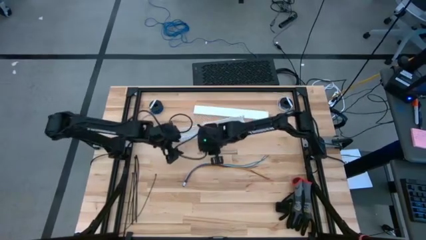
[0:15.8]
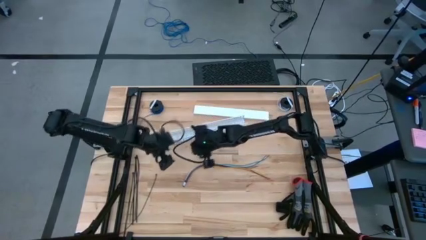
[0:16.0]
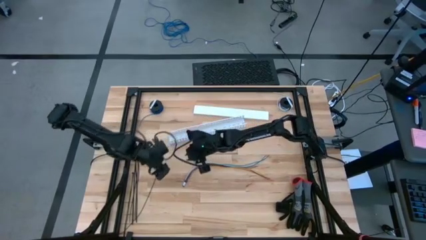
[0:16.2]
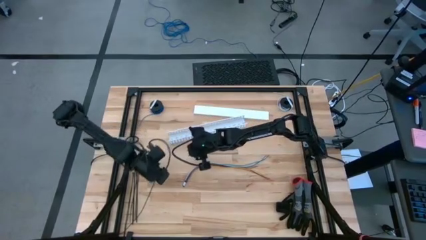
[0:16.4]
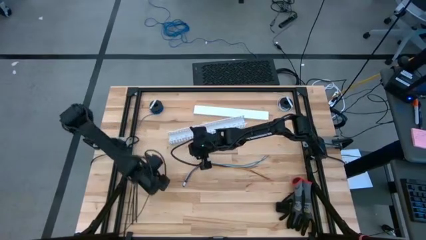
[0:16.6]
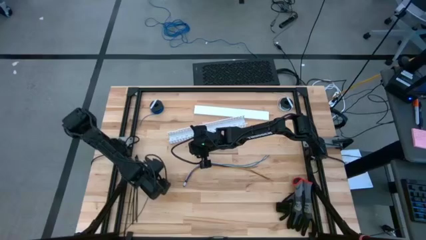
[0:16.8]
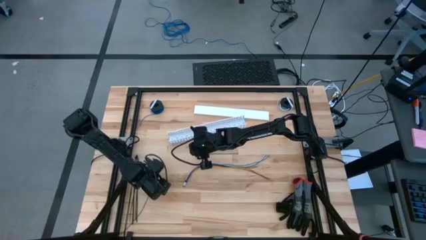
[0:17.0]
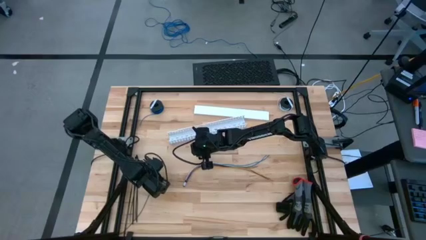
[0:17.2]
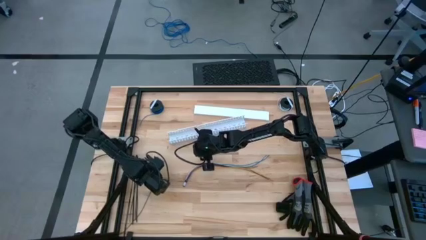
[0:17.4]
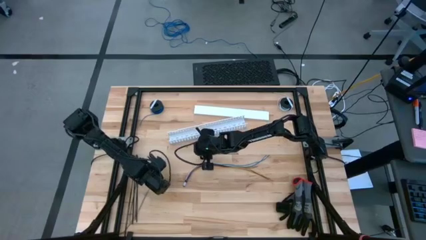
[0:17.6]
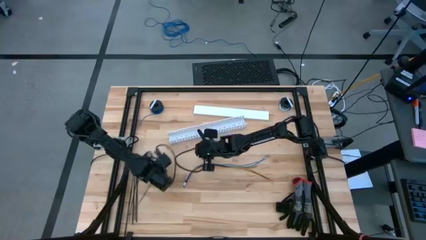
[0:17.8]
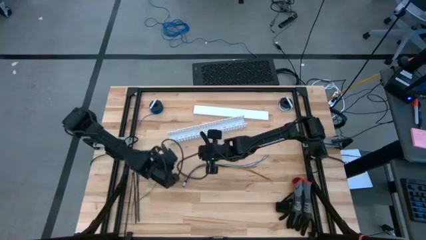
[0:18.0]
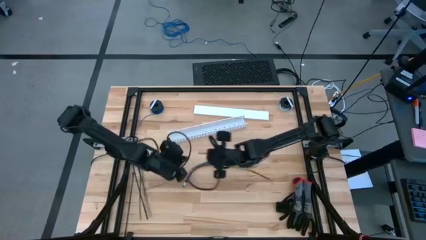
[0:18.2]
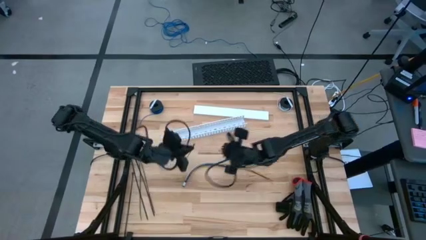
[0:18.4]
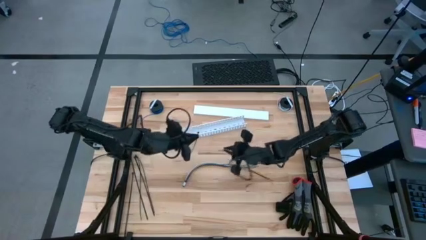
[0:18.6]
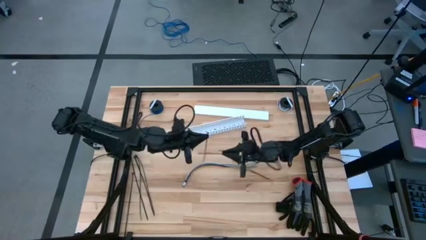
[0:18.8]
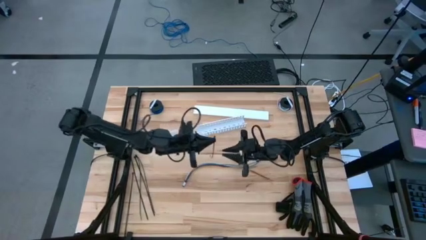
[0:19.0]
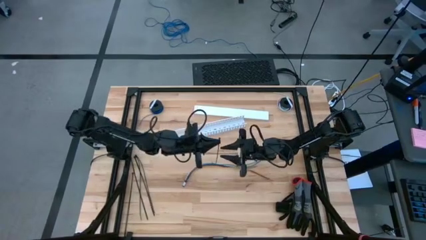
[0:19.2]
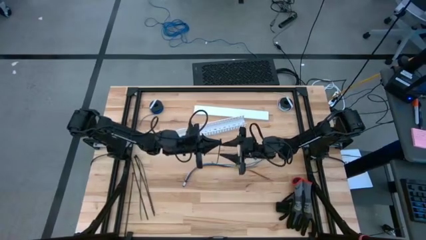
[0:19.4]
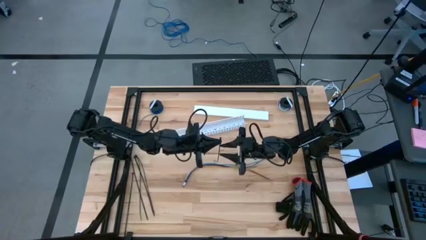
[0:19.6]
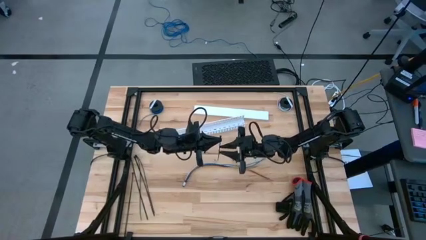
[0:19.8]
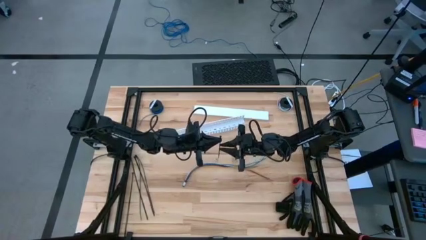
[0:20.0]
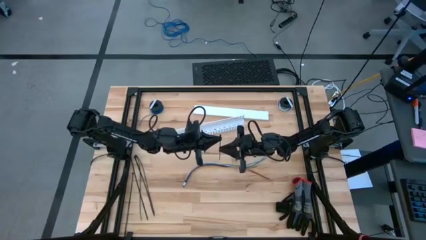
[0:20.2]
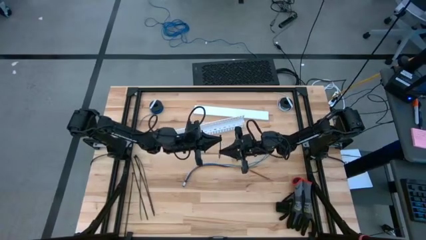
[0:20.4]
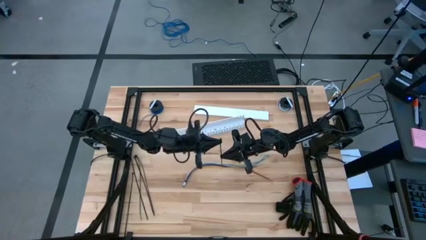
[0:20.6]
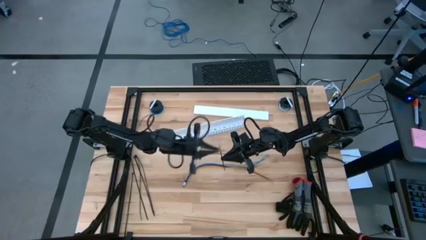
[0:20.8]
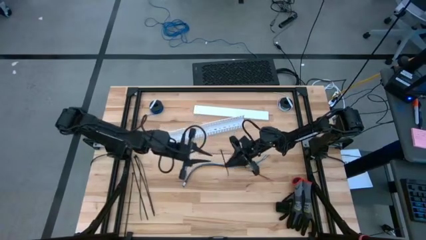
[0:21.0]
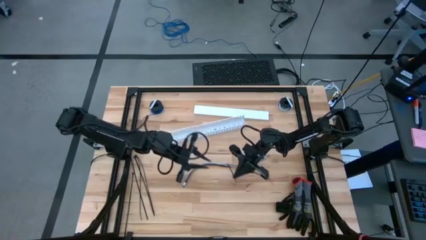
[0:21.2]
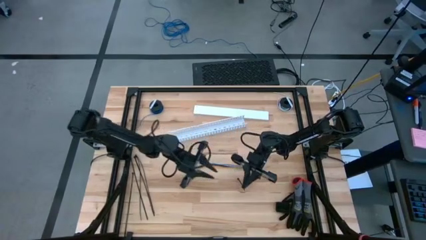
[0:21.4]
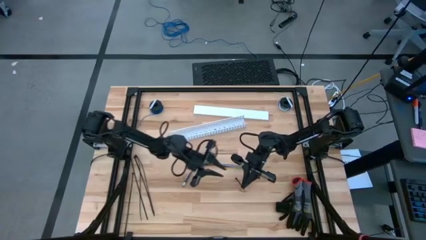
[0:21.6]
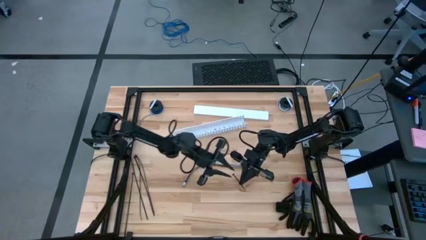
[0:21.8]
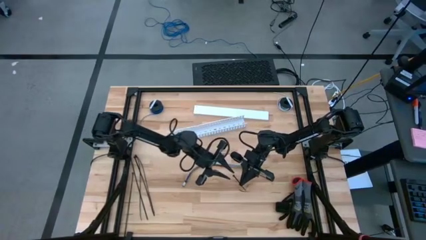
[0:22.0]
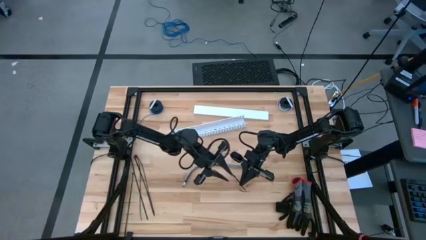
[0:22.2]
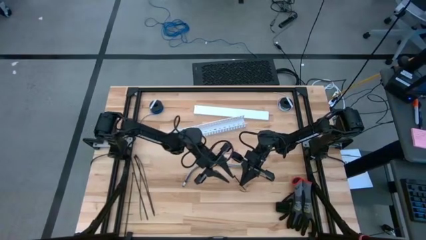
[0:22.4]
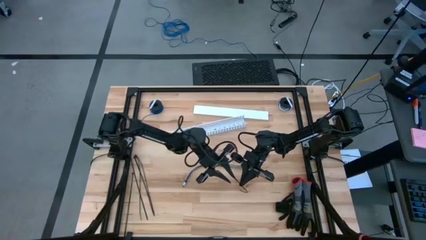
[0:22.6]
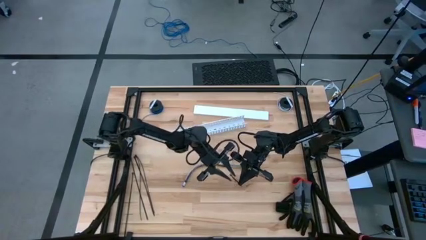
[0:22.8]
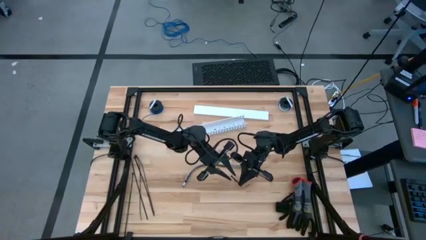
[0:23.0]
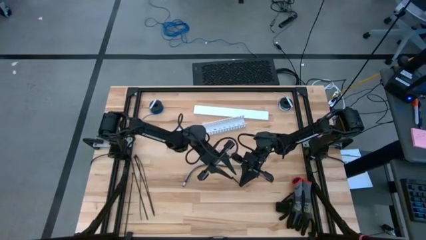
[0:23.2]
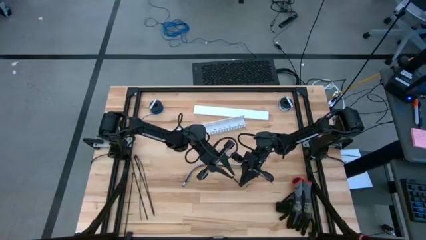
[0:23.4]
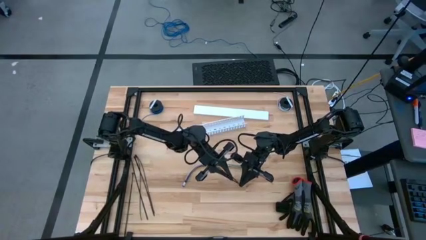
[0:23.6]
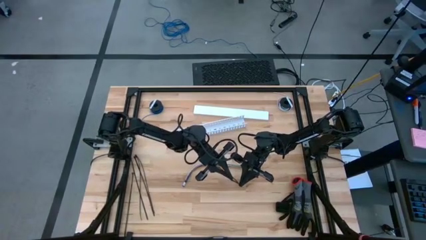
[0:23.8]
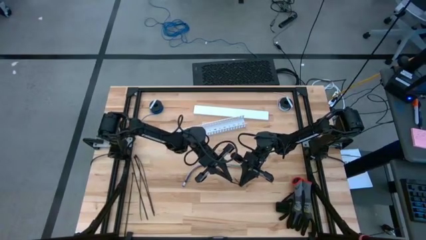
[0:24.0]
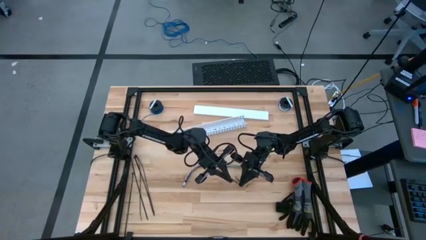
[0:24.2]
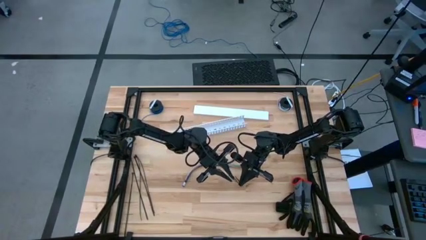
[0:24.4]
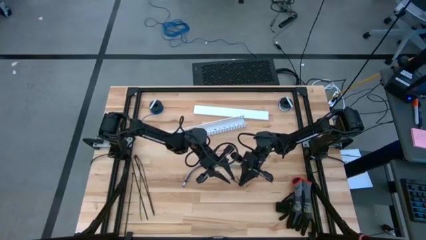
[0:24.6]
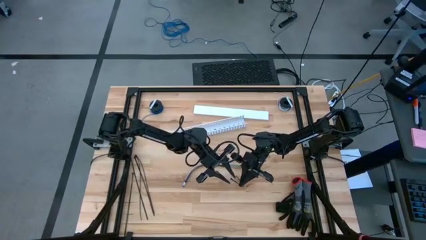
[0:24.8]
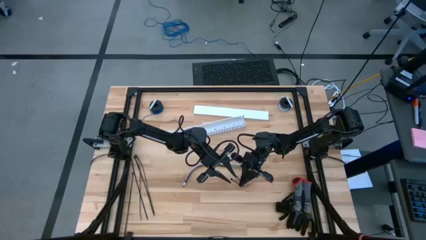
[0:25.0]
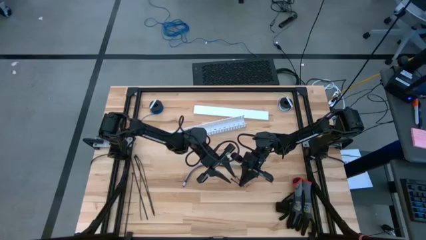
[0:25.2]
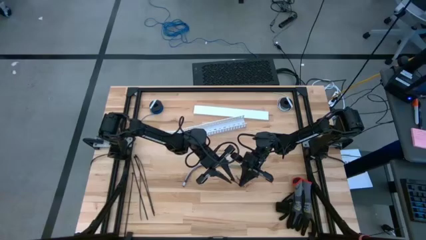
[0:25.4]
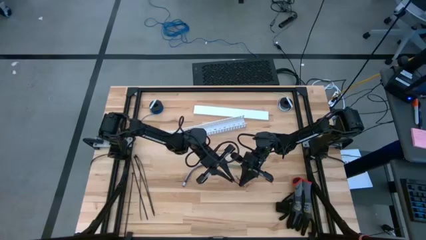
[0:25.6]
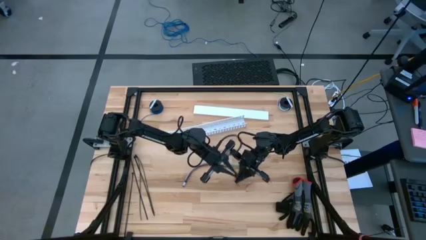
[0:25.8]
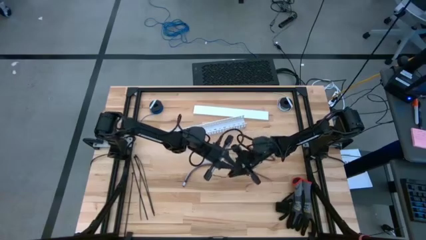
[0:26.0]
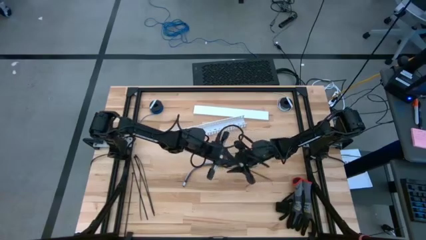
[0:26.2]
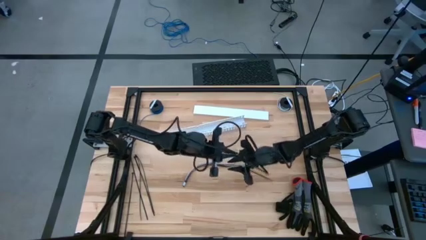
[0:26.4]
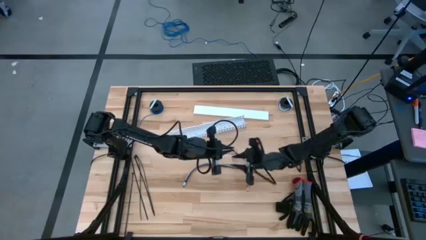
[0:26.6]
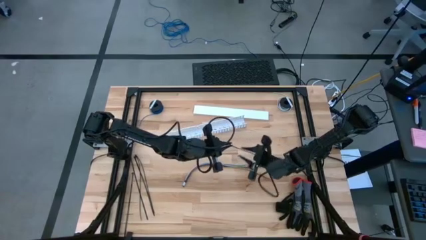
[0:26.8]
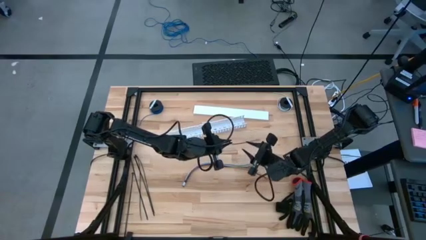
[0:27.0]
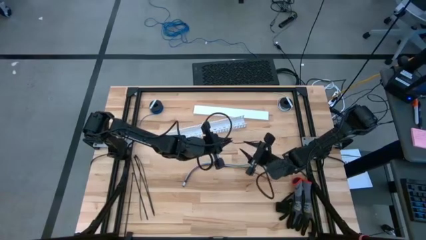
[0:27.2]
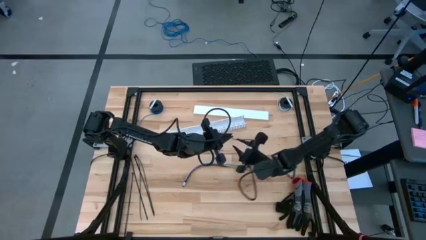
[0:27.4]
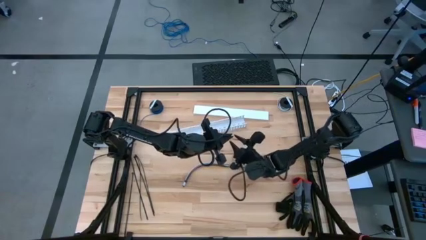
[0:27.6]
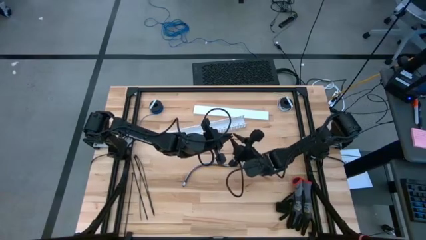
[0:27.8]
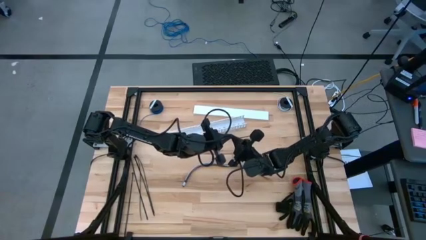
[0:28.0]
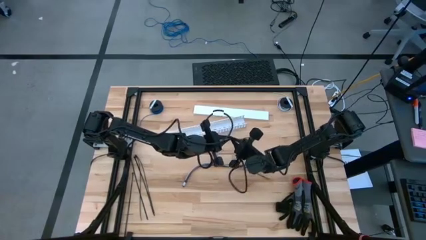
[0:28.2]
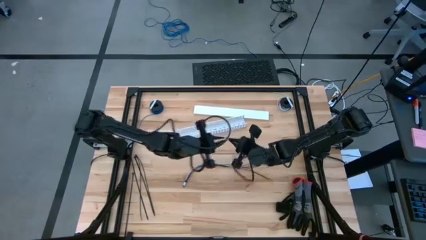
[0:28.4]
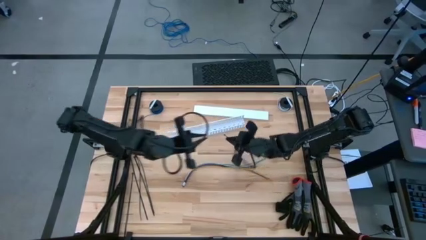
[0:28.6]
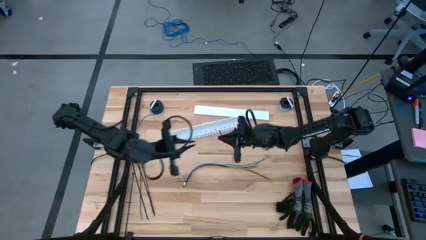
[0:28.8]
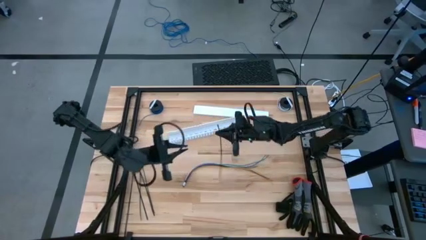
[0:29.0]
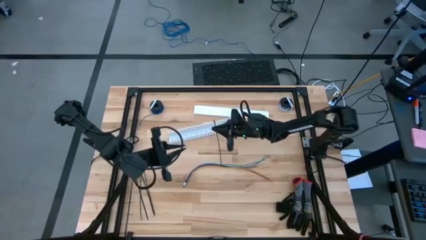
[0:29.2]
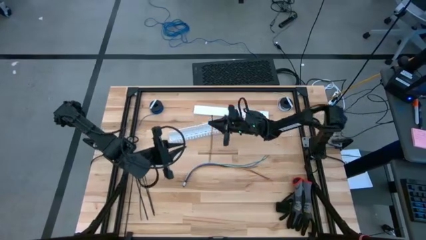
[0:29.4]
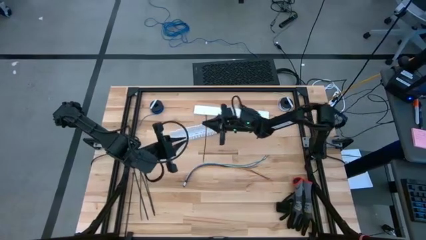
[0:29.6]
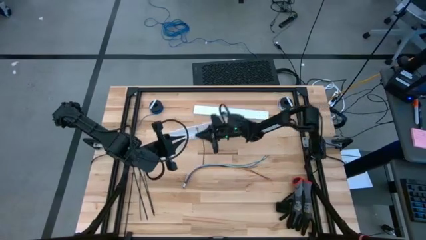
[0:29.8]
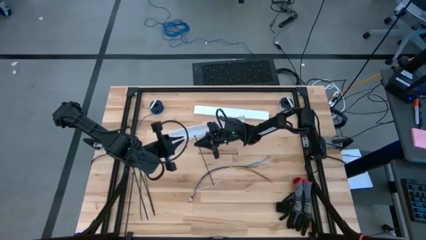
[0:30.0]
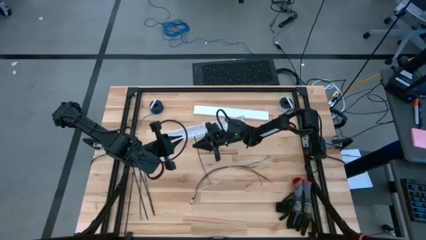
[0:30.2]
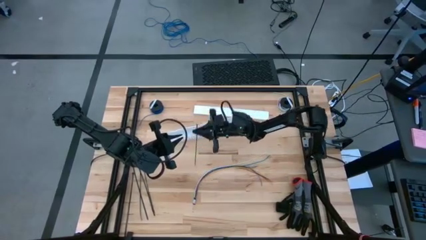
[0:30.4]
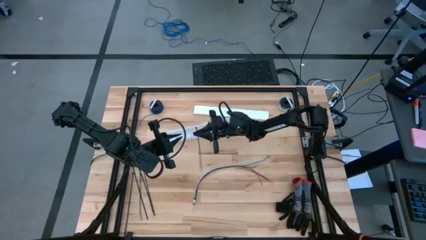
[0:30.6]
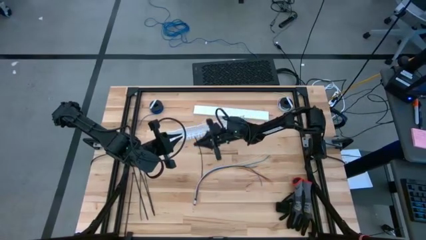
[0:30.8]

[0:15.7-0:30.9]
Task: Ziptie cables
Wrap the colored loose cables with the black zip tie
